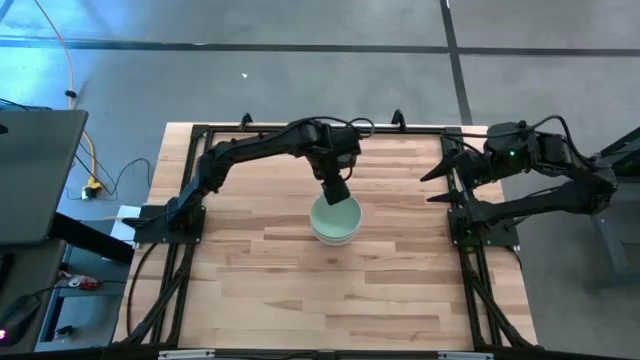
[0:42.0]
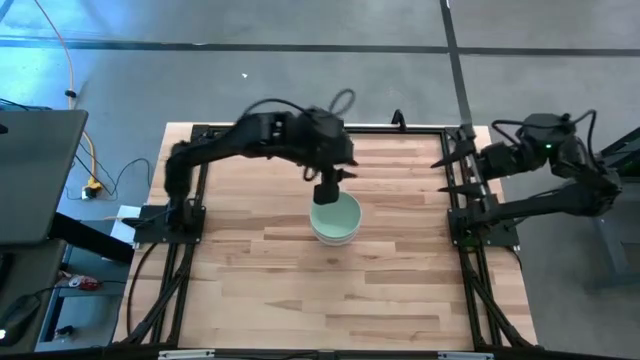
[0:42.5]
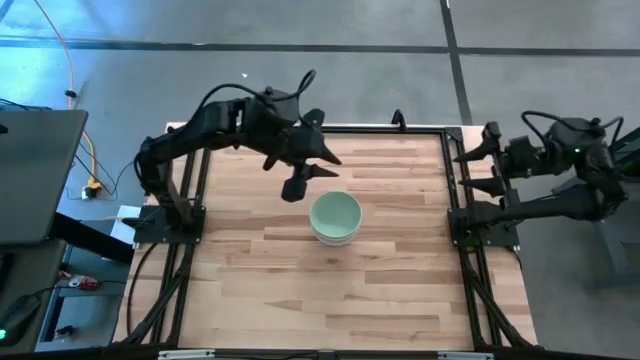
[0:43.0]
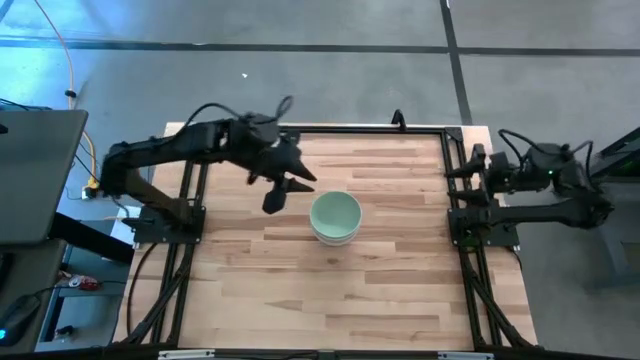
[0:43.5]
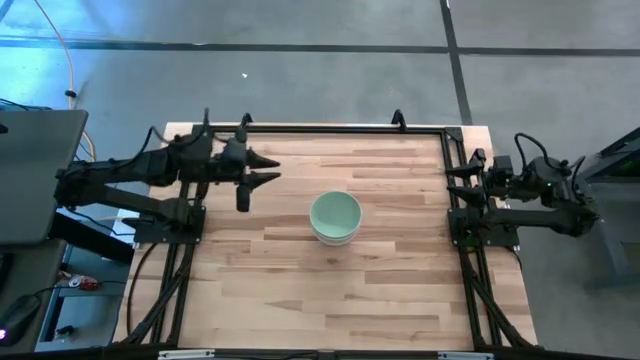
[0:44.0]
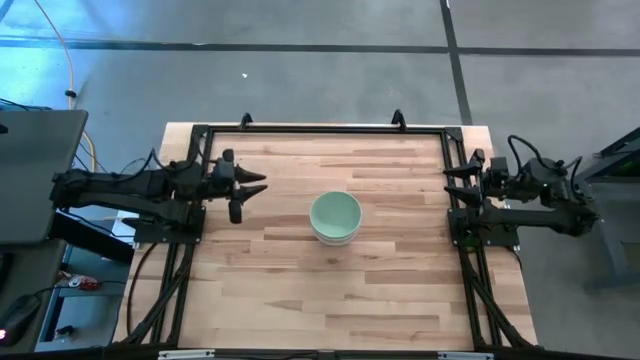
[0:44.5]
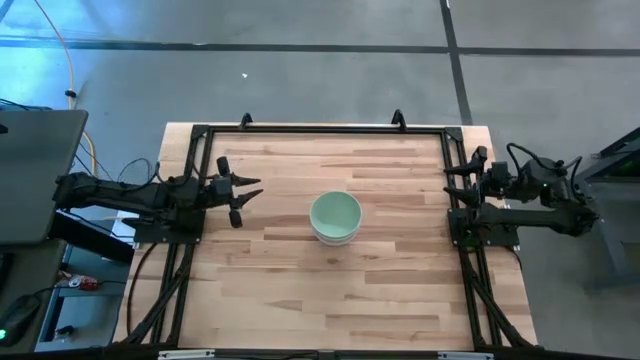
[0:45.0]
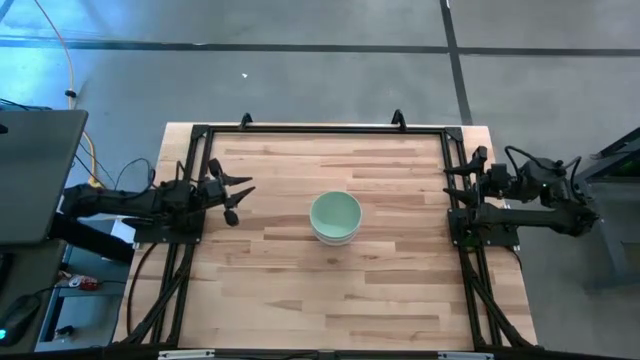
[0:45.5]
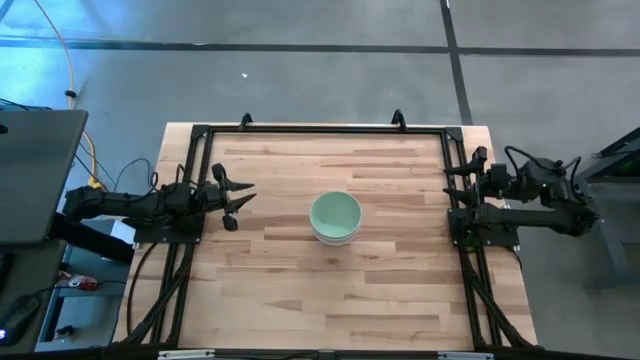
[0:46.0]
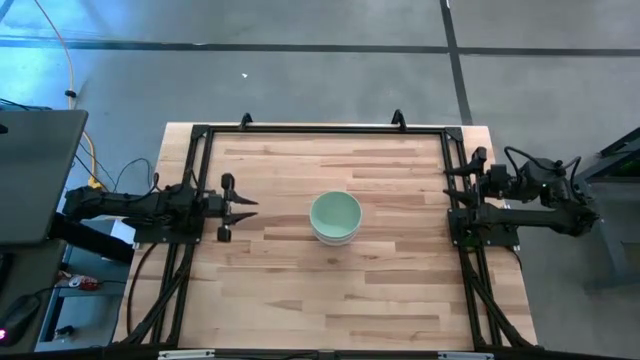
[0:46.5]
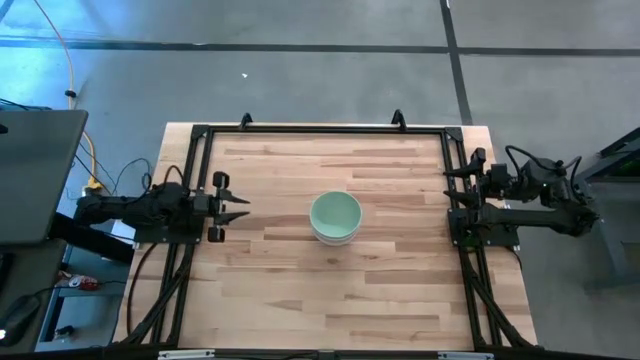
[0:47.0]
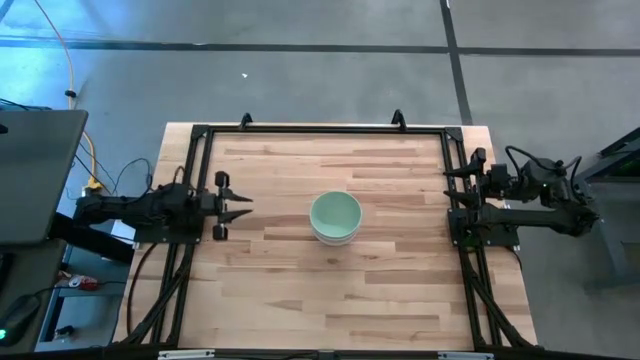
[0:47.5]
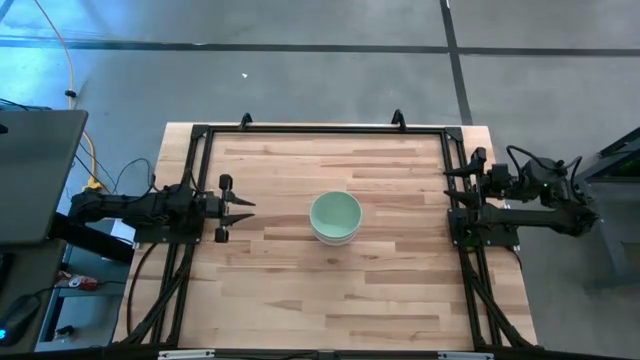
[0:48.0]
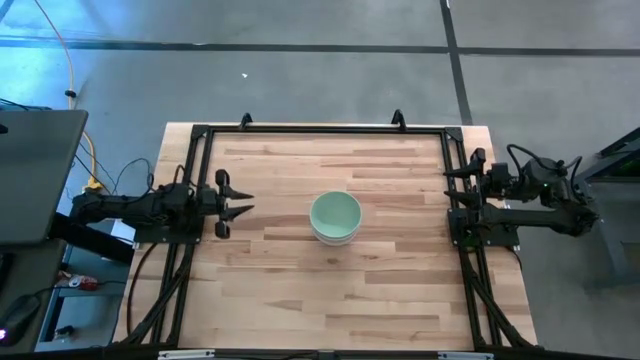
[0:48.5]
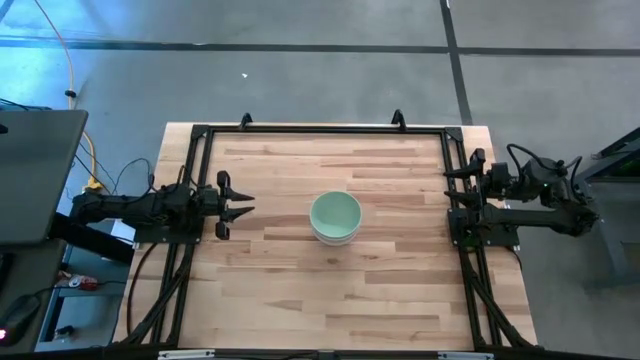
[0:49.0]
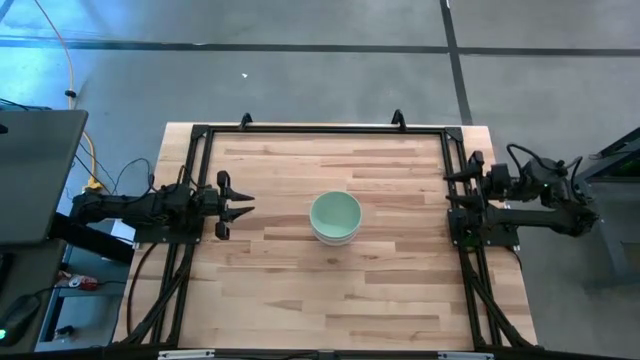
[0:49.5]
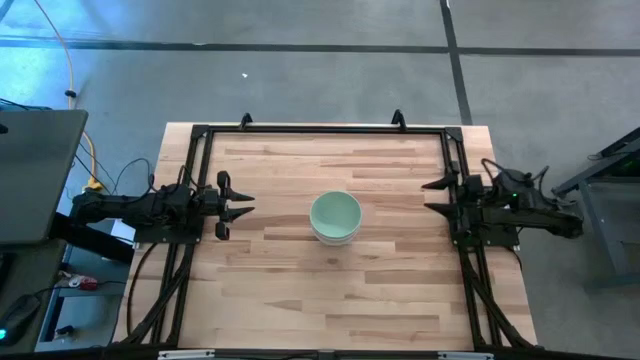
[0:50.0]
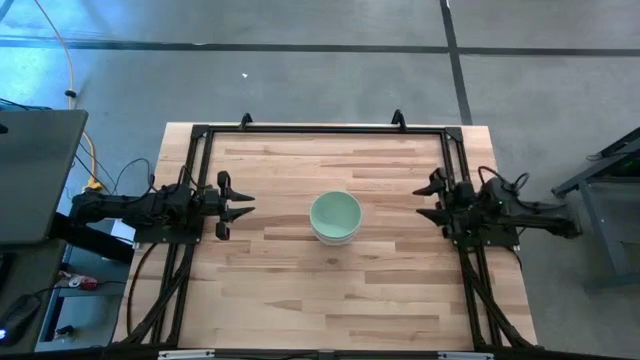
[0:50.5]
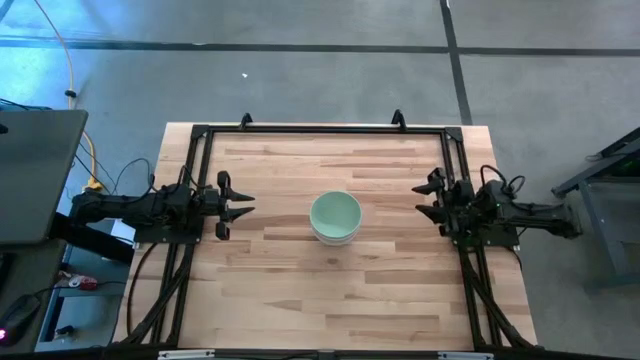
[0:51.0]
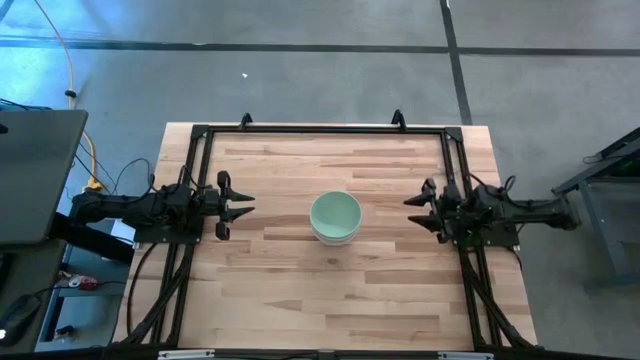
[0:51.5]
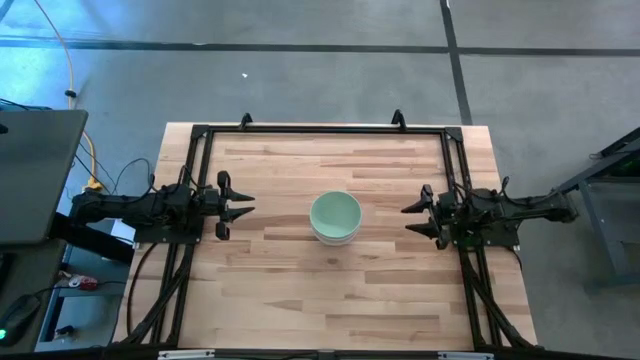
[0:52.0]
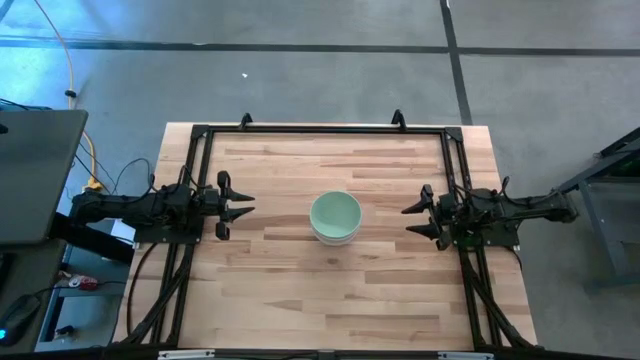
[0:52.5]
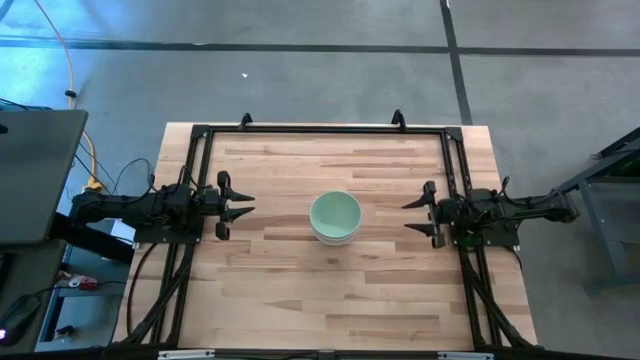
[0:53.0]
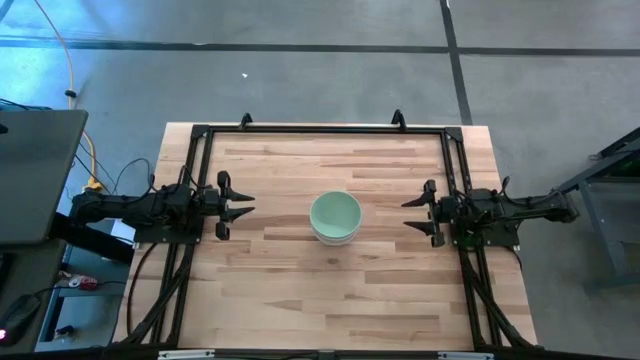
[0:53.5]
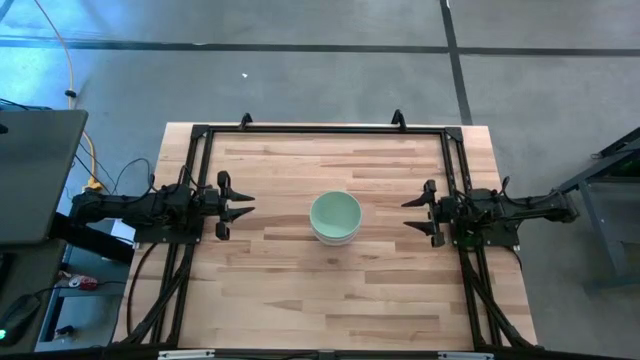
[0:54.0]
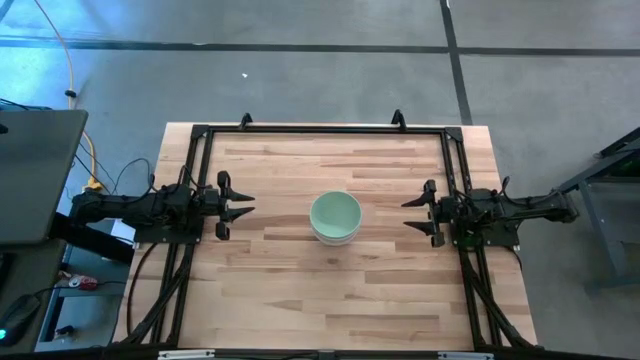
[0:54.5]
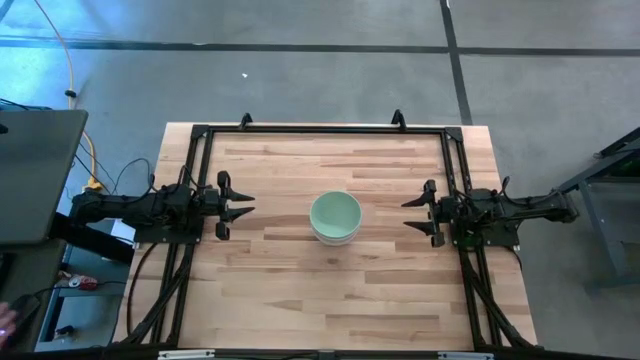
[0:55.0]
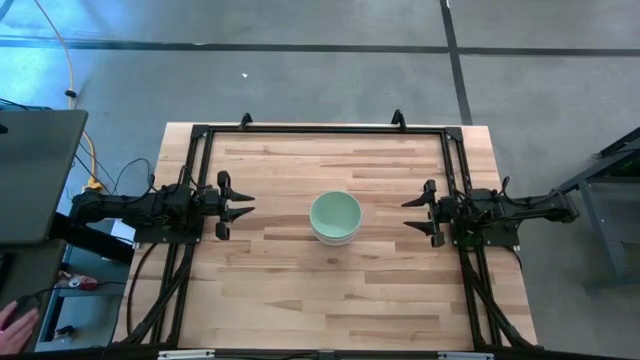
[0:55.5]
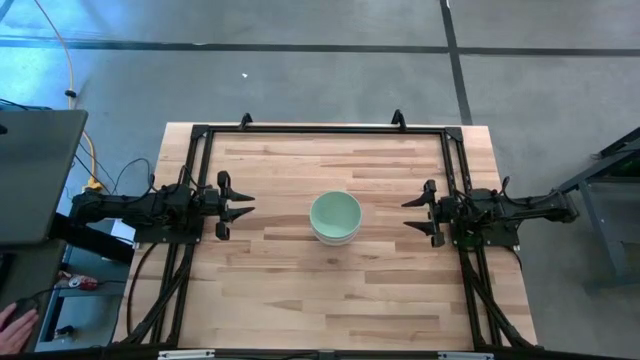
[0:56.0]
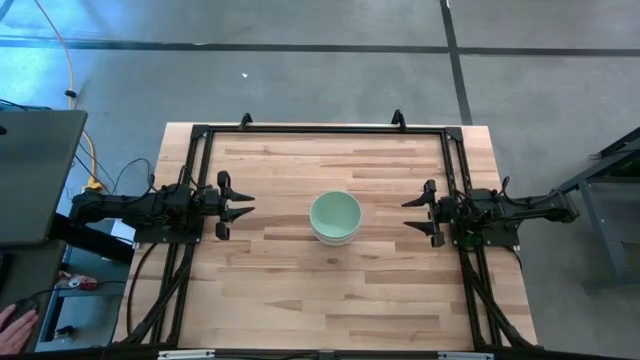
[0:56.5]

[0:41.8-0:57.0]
Task: Nest bowls inside each other
Return to Home Position

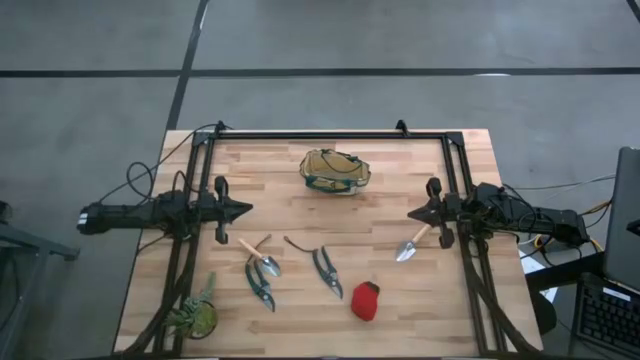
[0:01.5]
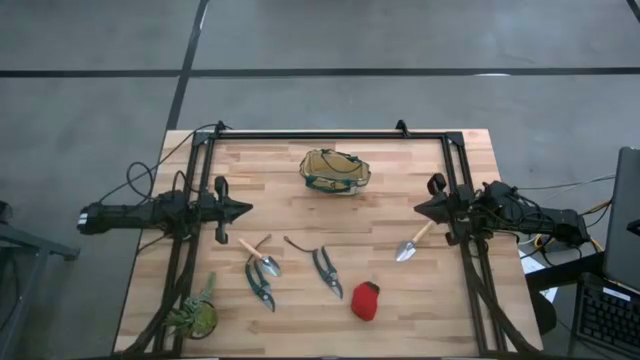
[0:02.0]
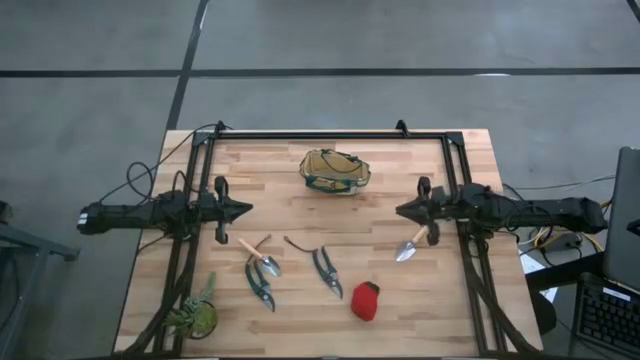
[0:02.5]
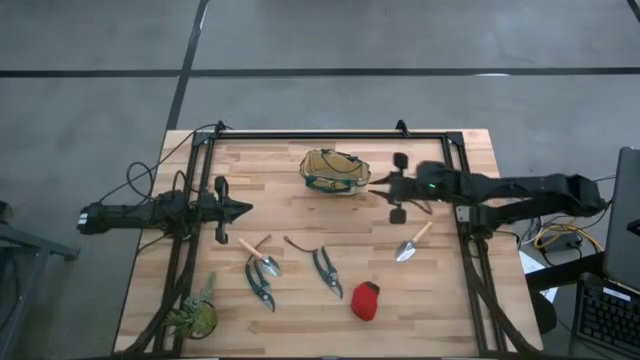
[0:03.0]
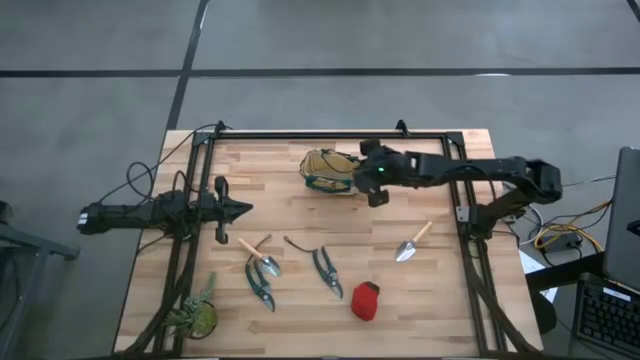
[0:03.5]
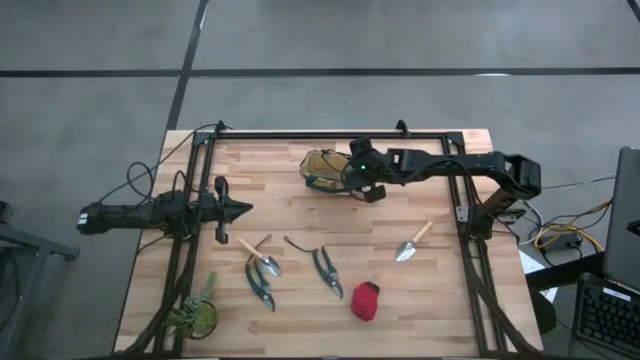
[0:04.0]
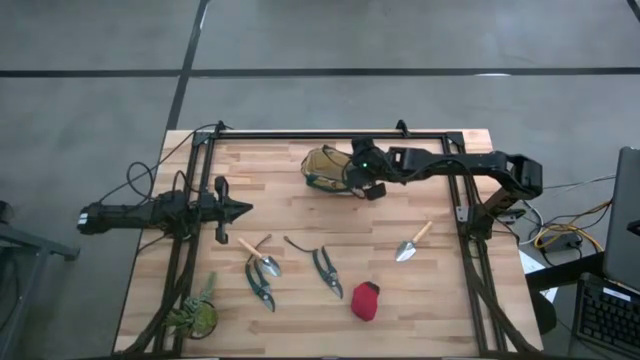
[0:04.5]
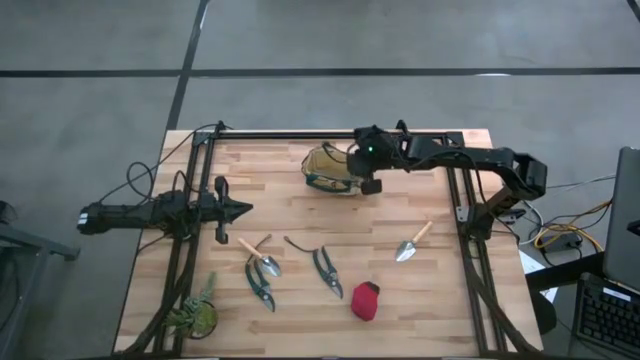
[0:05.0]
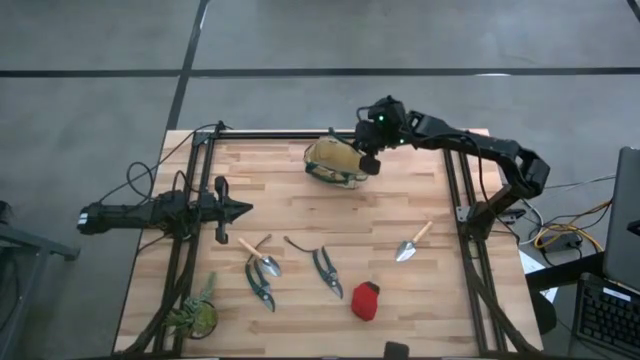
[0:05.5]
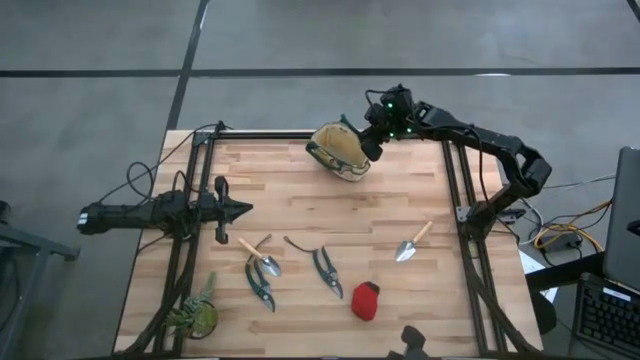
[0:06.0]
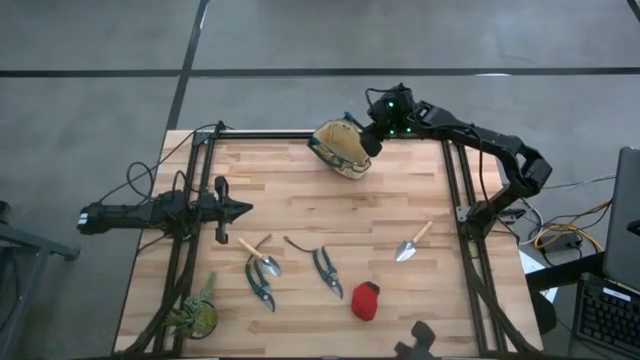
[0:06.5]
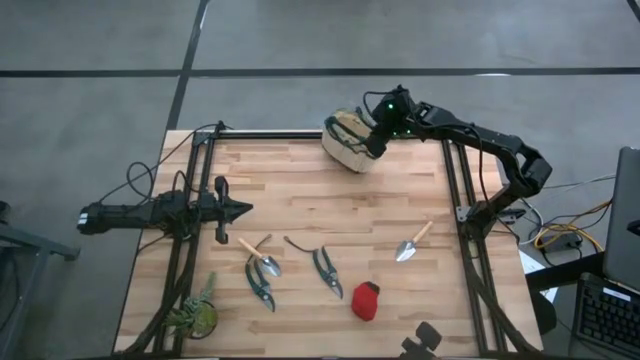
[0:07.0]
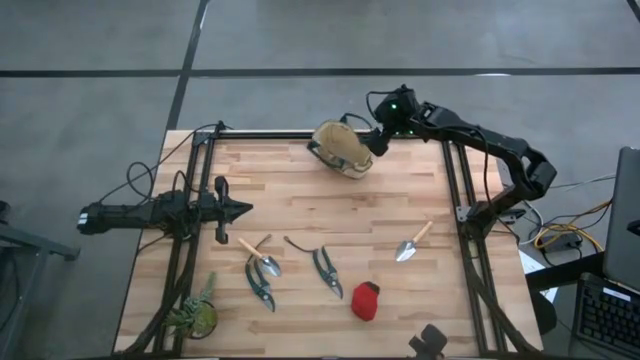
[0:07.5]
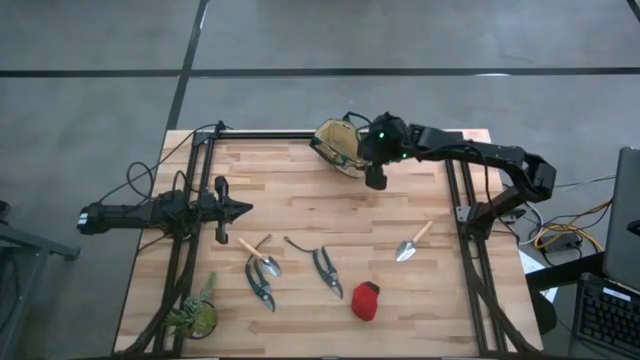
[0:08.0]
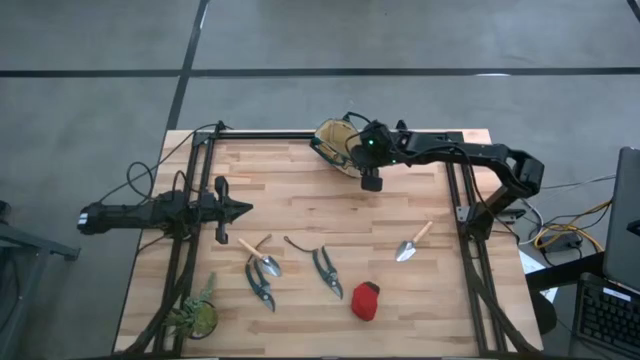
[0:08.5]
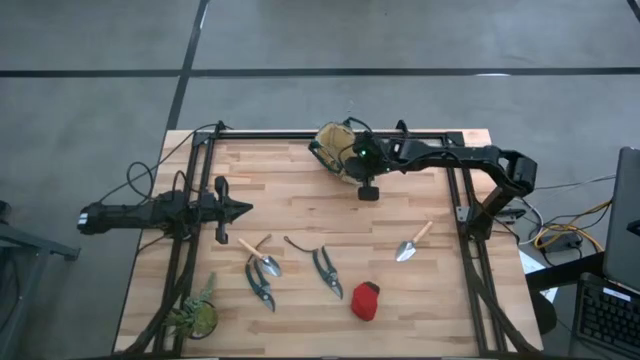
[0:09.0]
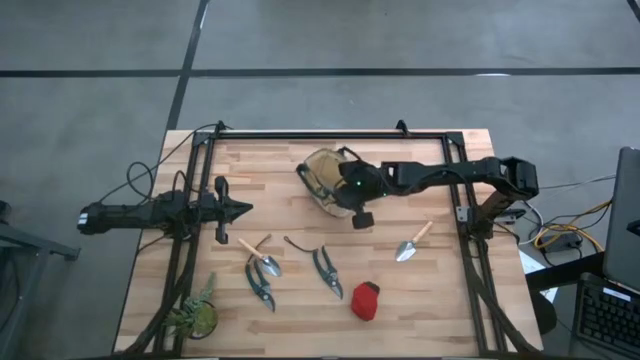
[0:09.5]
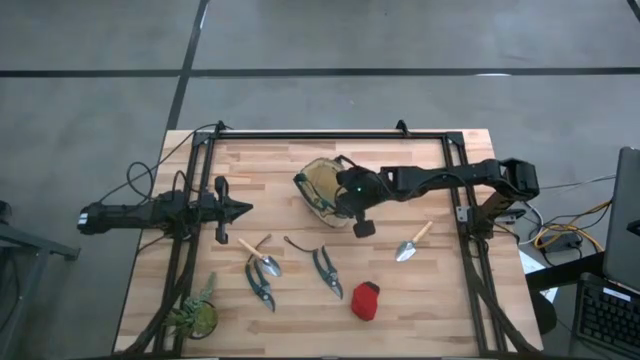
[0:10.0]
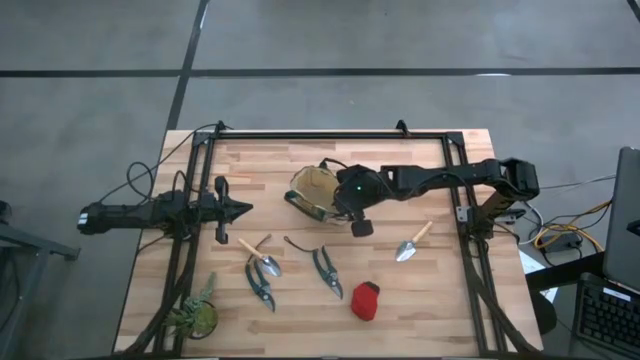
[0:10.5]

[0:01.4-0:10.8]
Task: Pick & Place Garden tools in Gardening bag
Prepare the gardening bag
